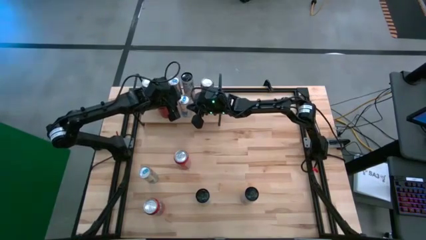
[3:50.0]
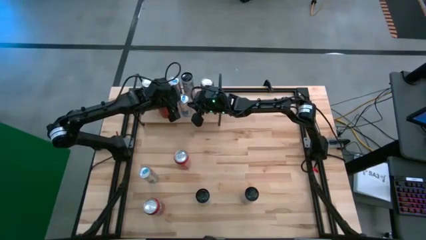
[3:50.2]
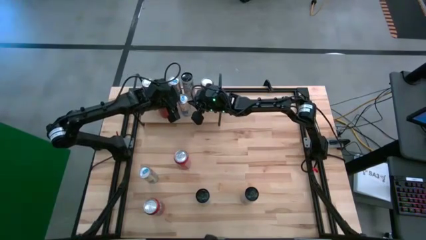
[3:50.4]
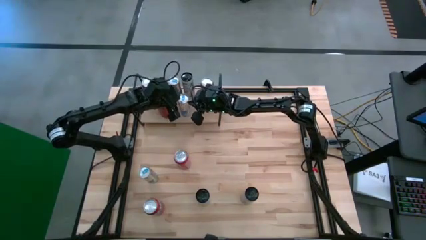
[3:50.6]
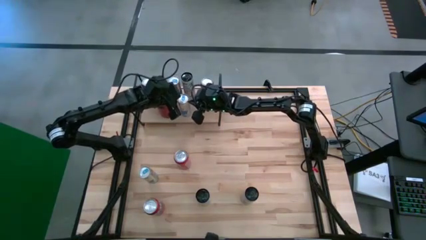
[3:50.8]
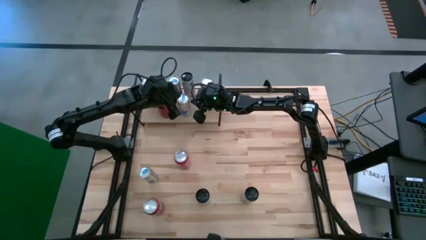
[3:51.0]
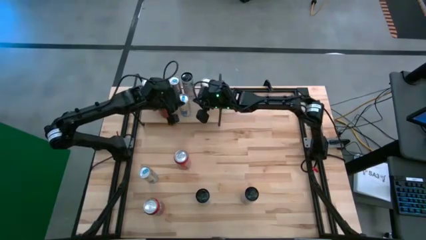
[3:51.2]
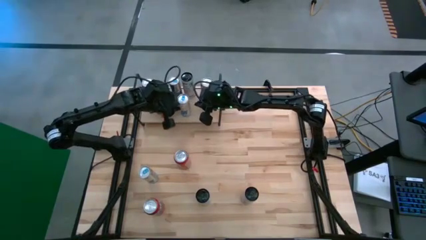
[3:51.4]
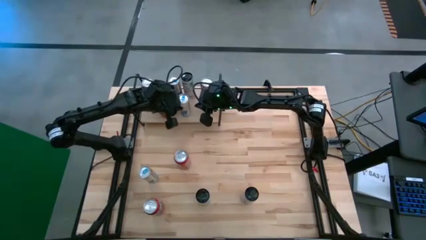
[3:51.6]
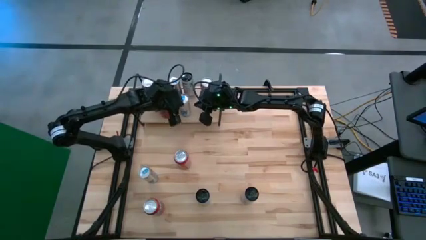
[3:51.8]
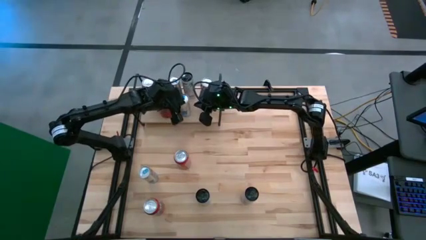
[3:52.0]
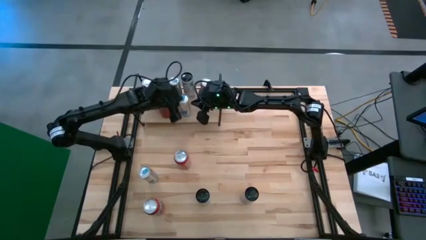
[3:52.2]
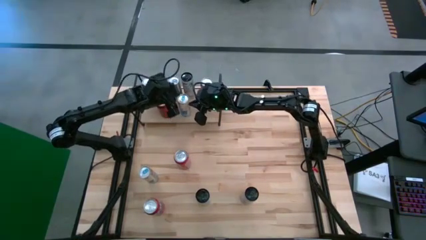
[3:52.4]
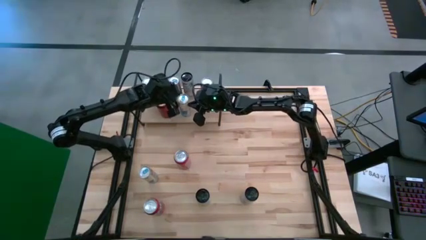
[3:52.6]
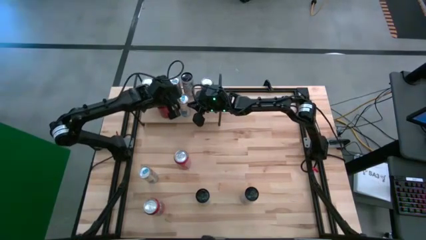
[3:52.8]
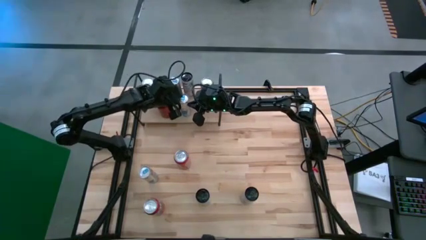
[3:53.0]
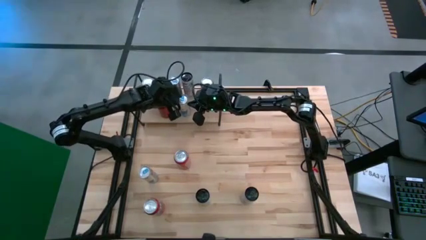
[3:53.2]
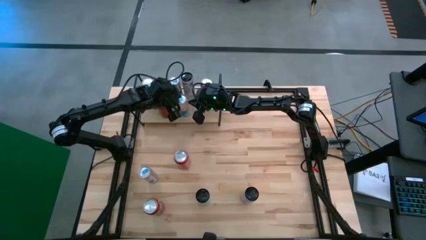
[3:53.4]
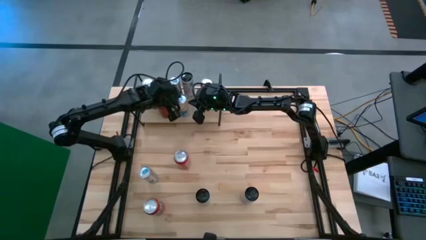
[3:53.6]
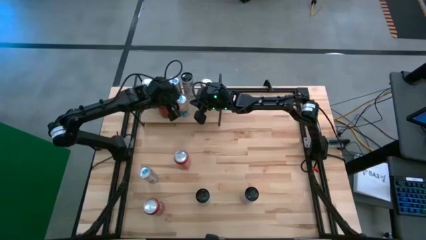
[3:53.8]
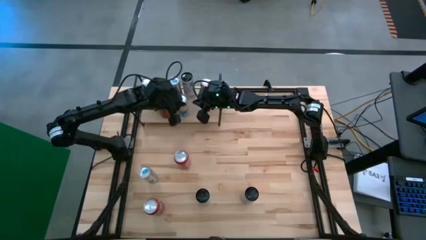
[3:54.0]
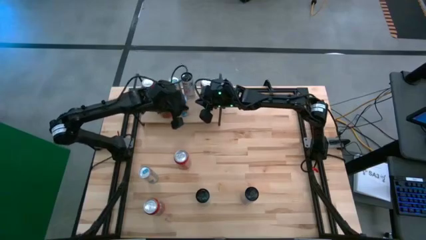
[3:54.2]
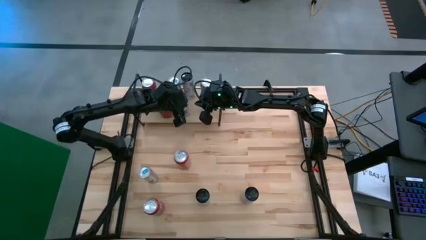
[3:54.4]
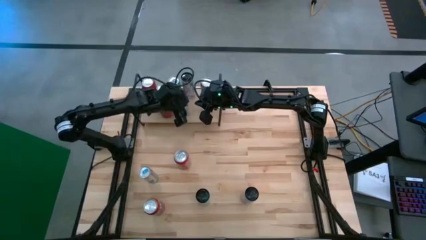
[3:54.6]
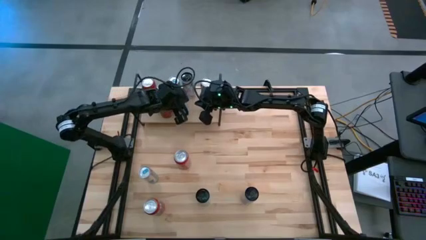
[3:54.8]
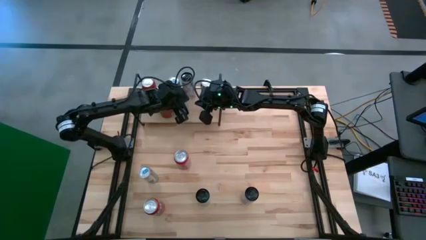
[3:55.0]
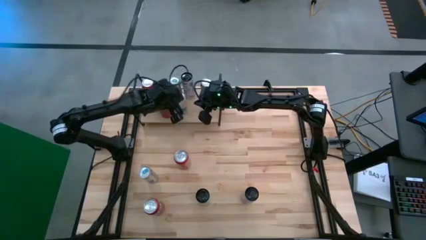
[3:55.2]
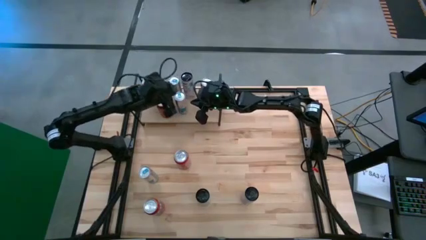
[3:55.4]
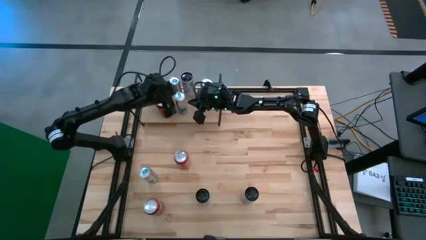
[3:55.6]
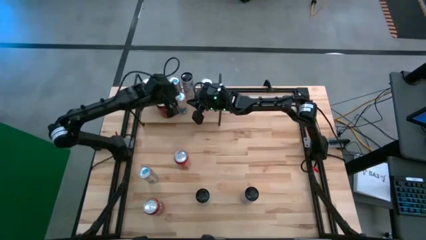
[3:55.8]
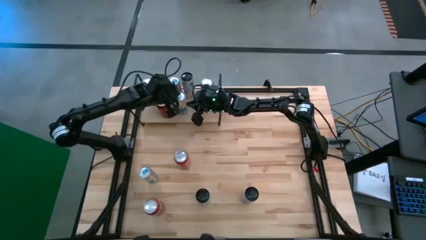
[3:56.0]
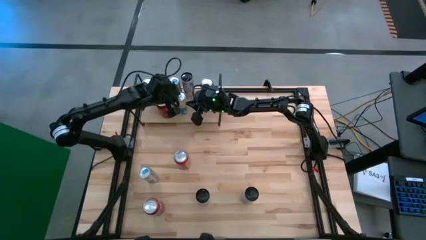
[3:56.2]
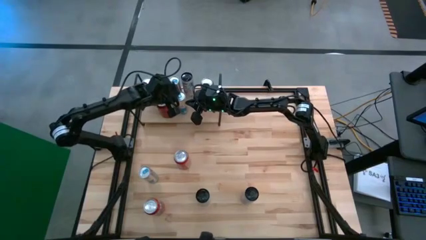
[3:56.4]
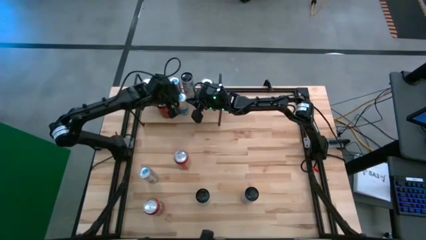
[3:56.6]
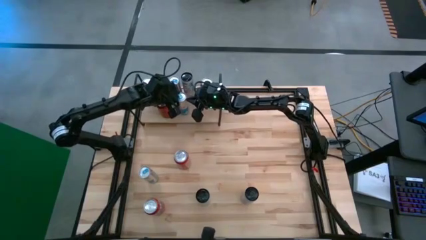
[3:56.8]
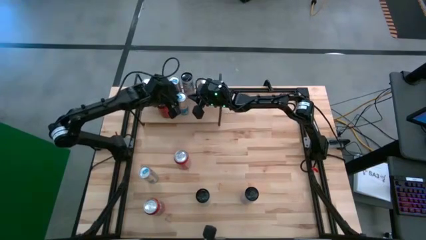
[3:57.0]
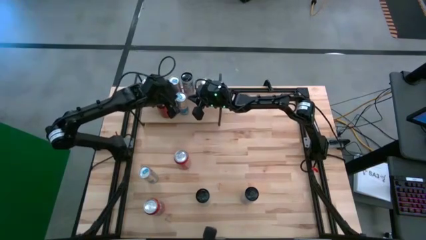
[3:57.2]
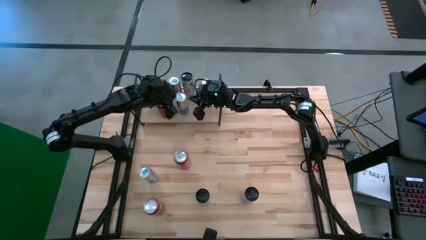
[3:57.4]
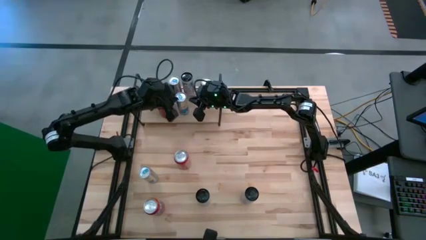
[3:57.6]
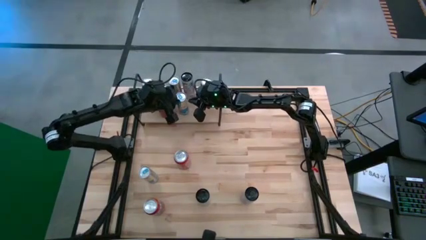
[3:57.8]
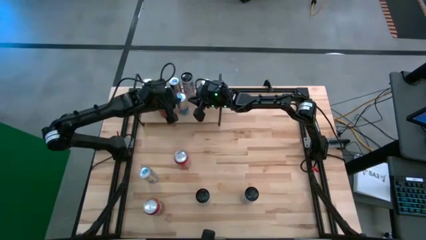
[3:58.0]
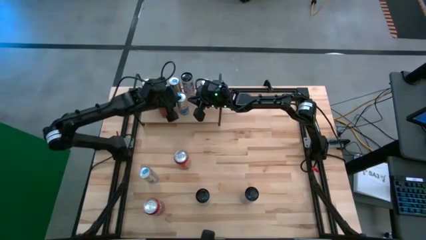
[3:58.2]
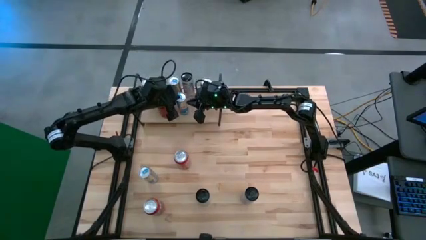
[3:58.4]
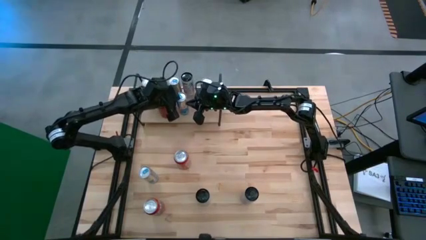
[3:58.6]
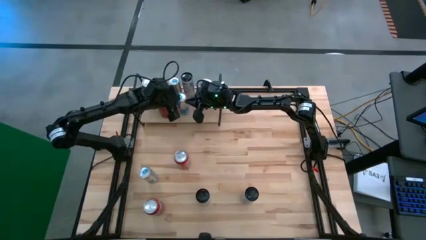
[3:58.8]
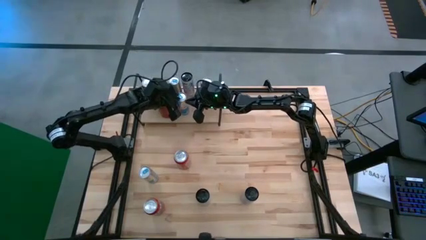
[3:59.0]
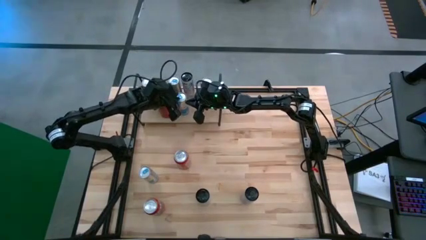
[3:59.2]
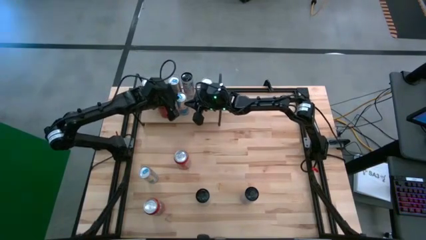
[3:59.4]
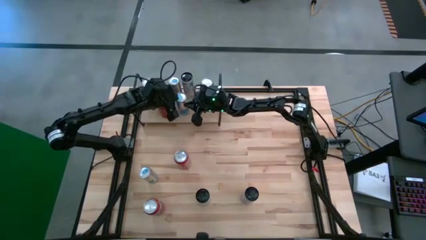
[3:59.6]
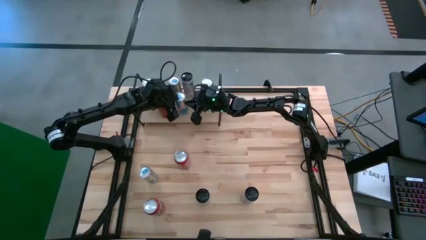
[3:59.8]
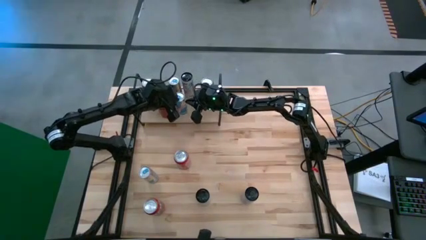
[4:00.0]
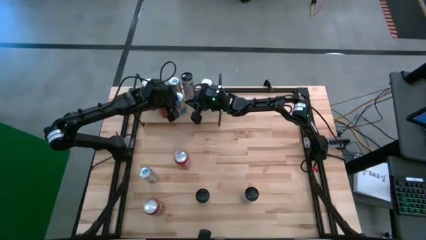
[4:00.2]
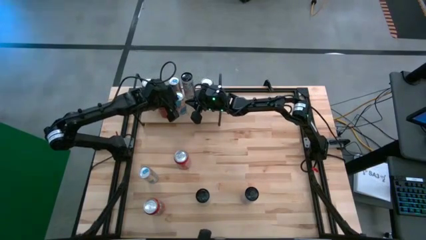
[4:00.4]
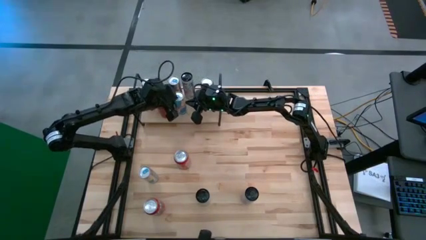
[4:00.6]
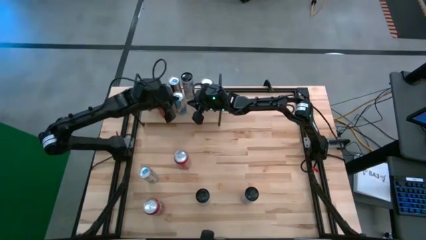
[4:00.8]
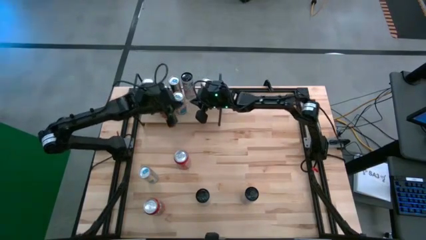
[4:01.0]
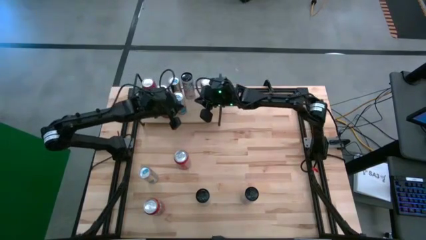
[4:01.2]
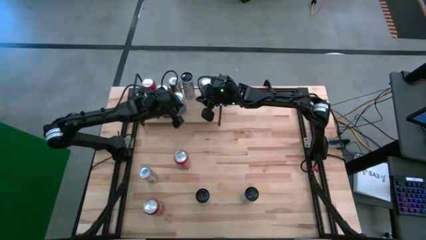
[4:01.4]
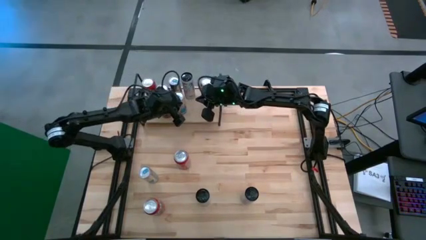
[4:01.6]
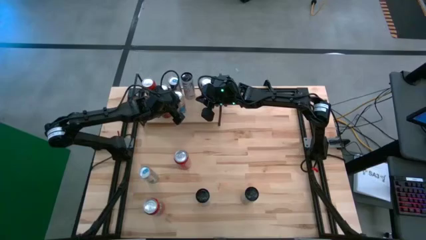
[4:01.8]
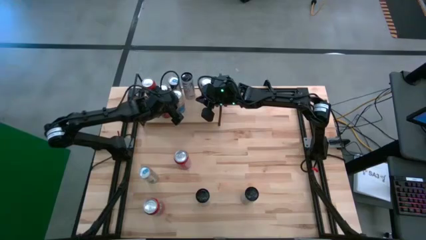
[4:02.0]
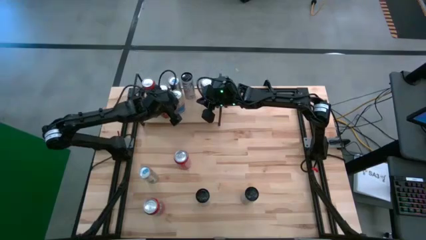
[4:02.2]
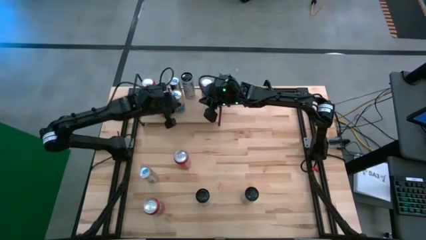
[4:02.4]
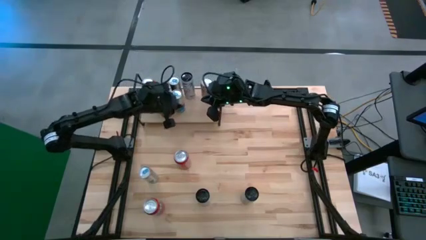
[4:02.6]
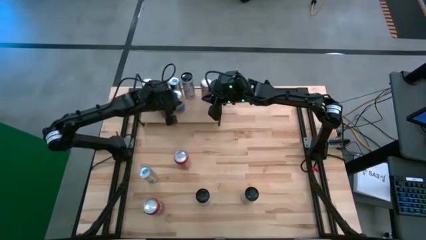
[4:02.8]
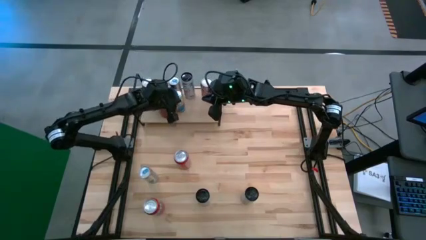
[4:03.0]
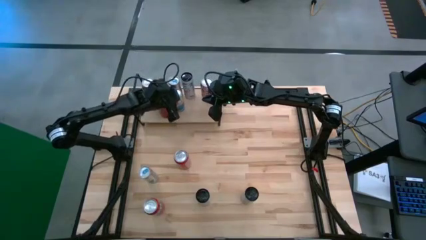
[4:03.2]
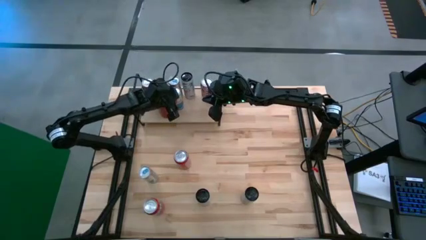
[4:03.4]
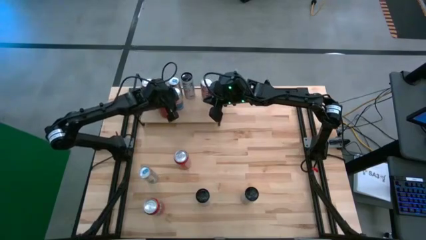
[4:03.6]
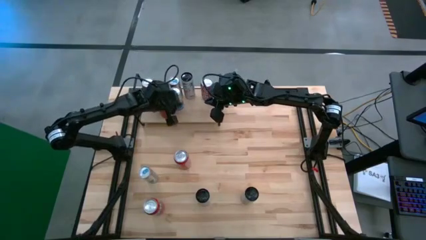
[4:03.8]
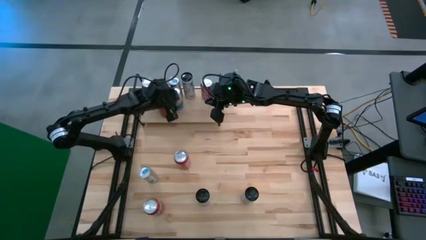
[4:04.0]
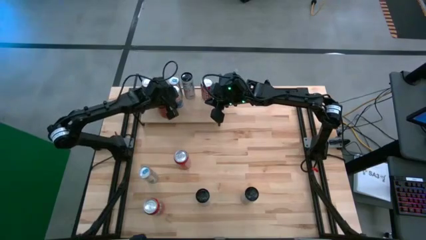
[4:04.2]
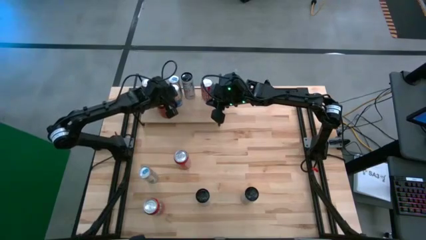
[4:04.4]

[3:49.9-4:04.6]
Task: Place canned beverage on shelf
Put the right blue soda can on the shelf aligned with the other blue soda can
